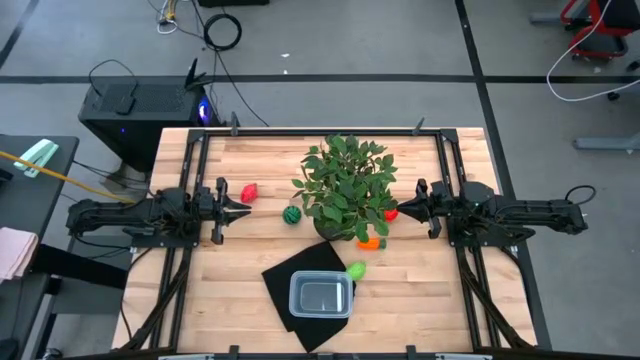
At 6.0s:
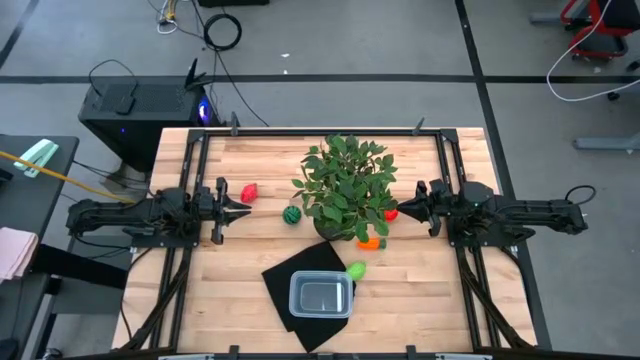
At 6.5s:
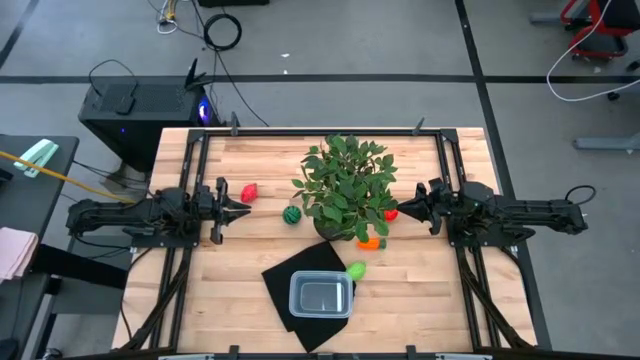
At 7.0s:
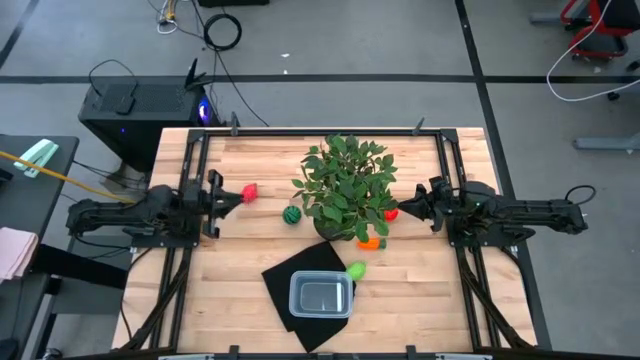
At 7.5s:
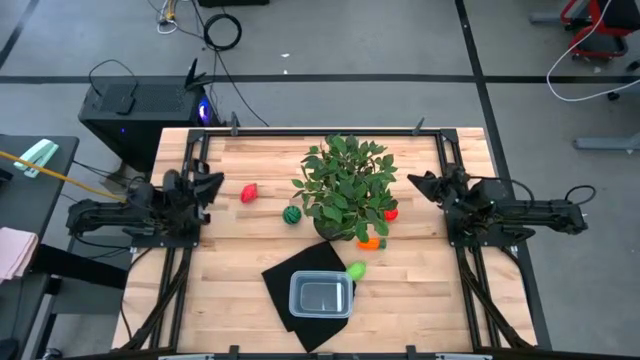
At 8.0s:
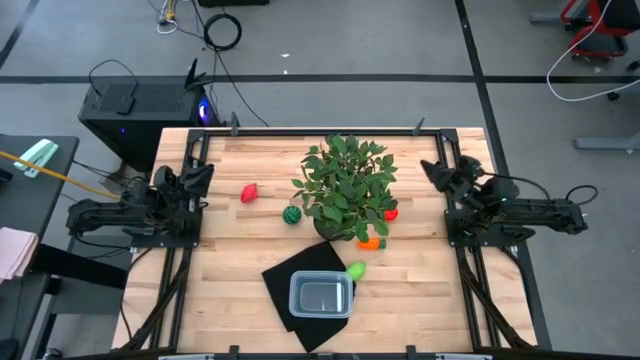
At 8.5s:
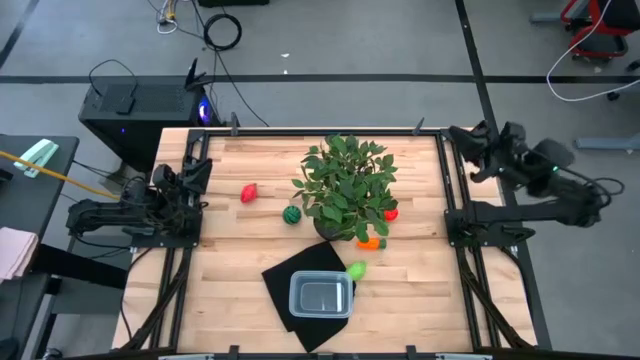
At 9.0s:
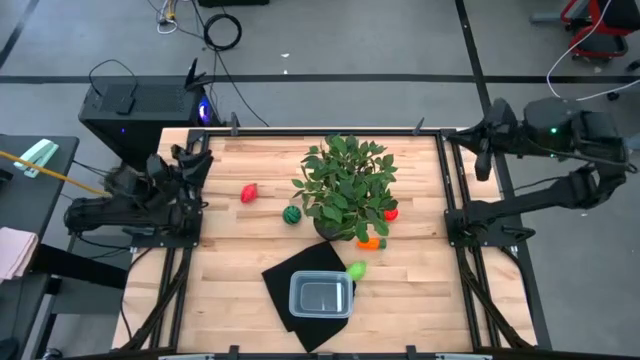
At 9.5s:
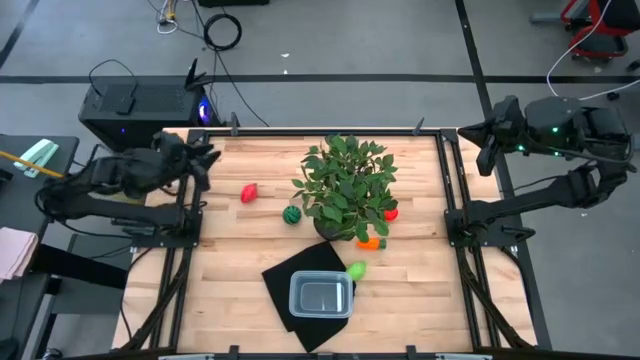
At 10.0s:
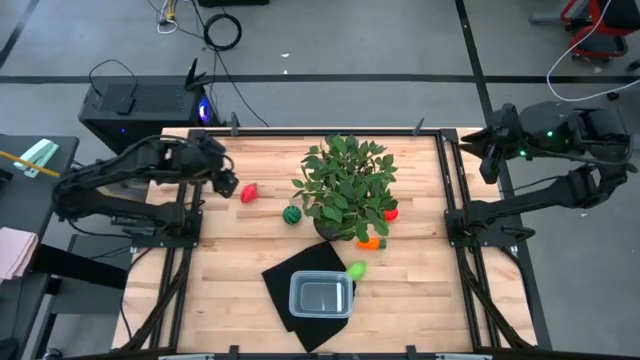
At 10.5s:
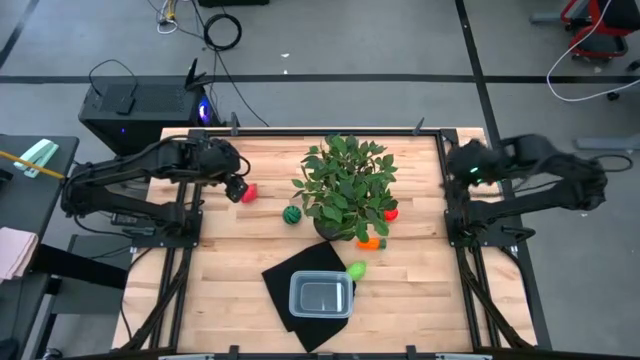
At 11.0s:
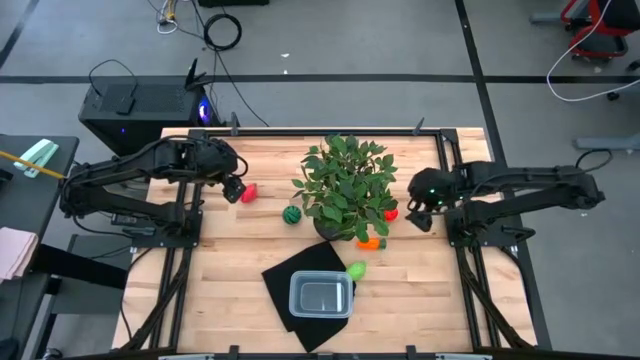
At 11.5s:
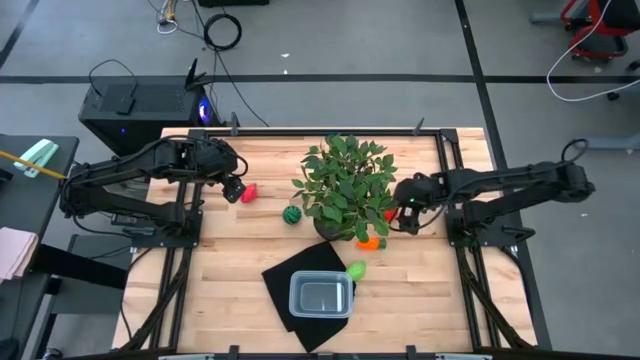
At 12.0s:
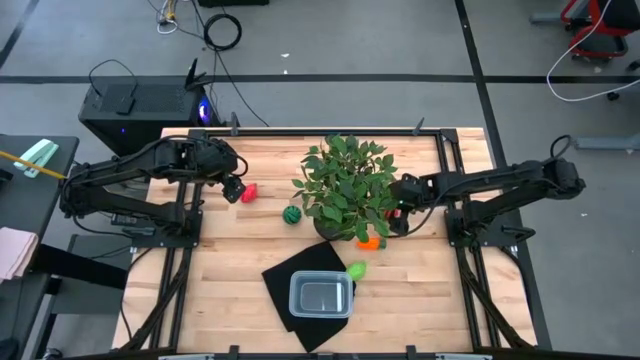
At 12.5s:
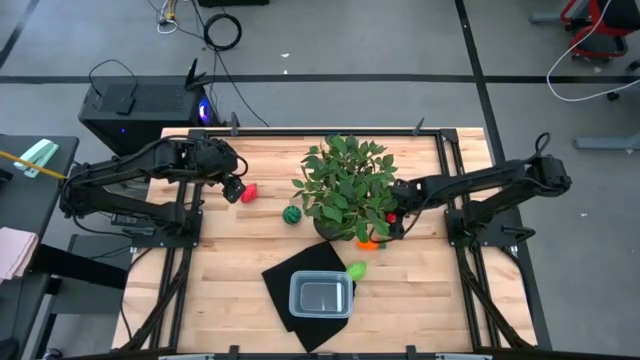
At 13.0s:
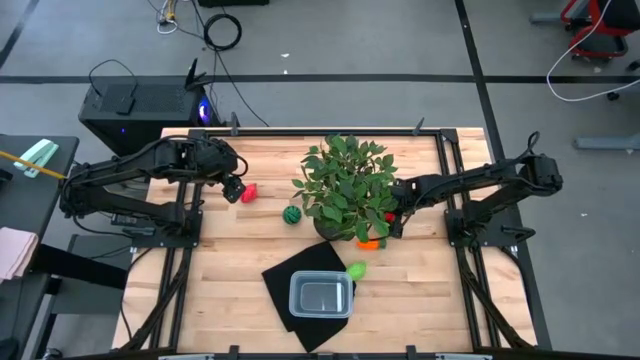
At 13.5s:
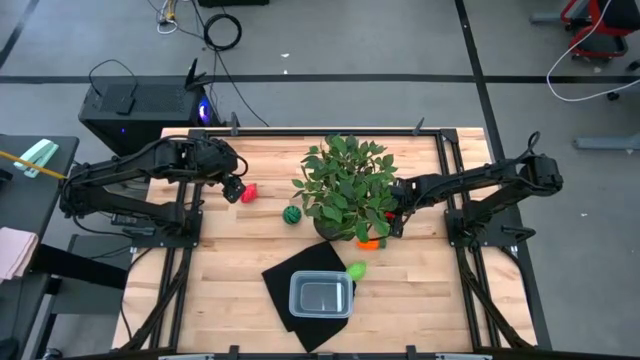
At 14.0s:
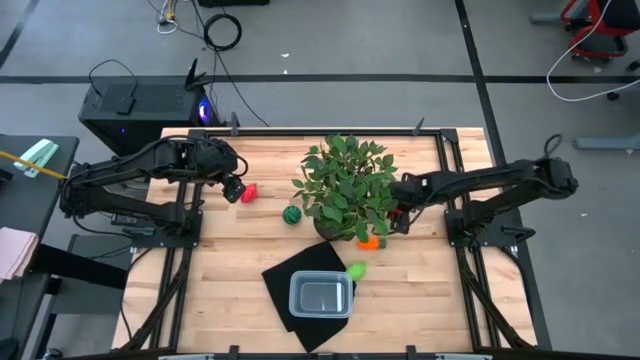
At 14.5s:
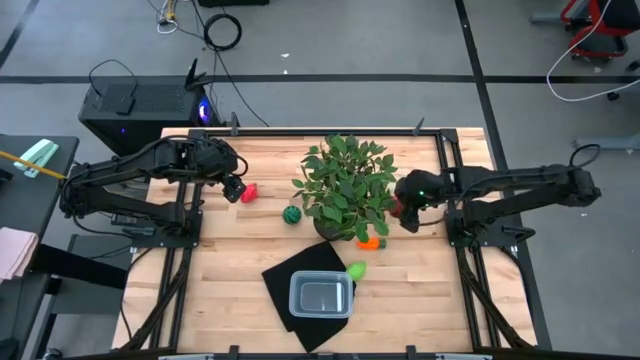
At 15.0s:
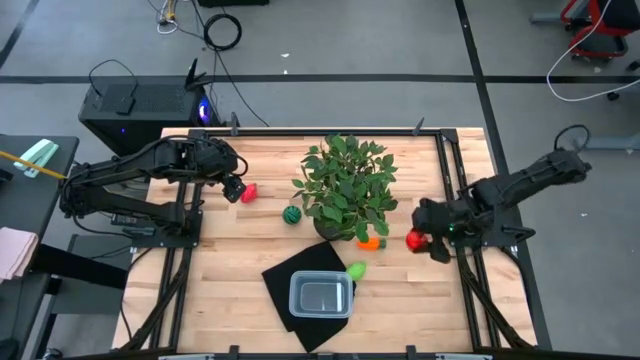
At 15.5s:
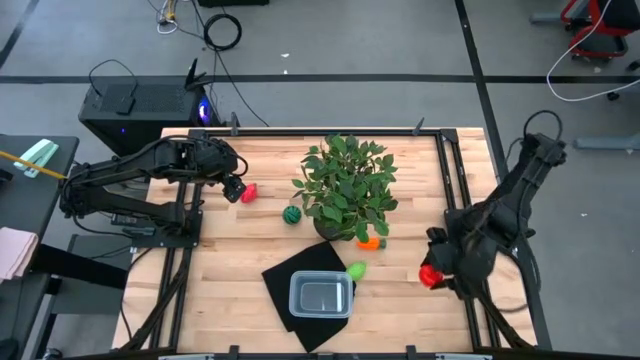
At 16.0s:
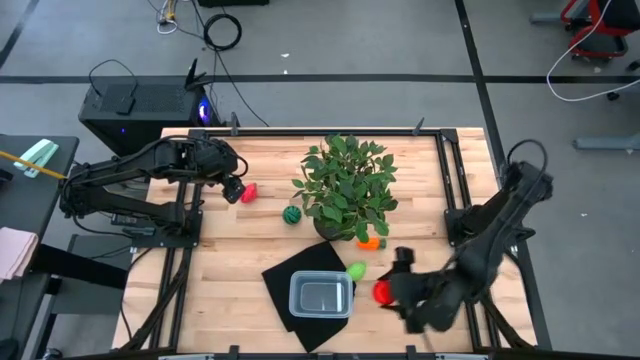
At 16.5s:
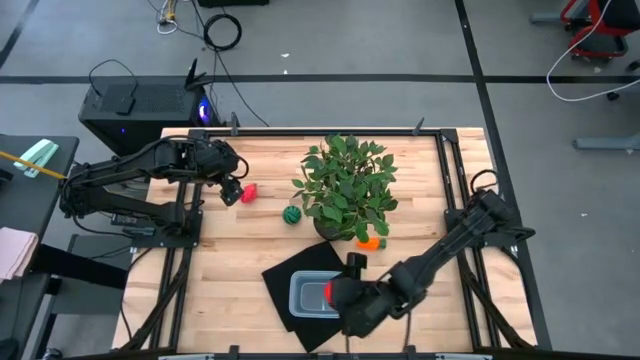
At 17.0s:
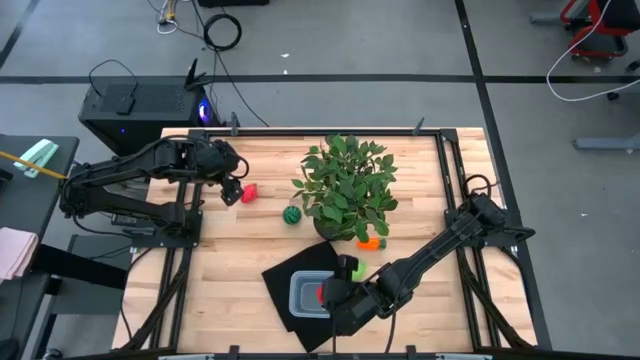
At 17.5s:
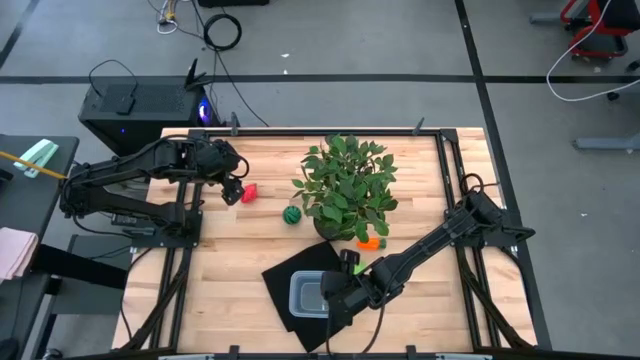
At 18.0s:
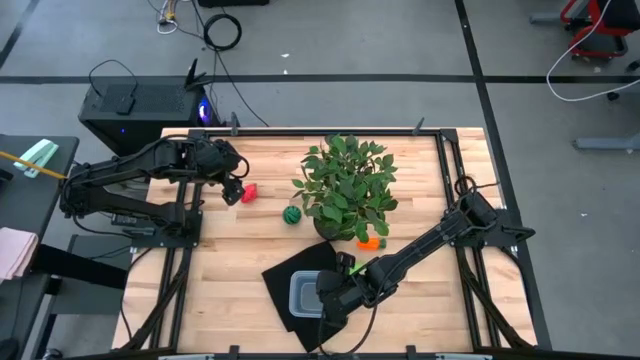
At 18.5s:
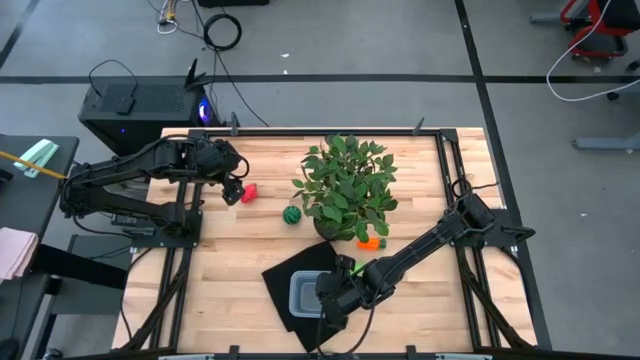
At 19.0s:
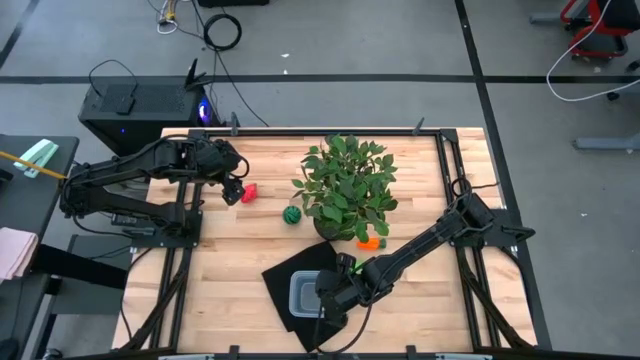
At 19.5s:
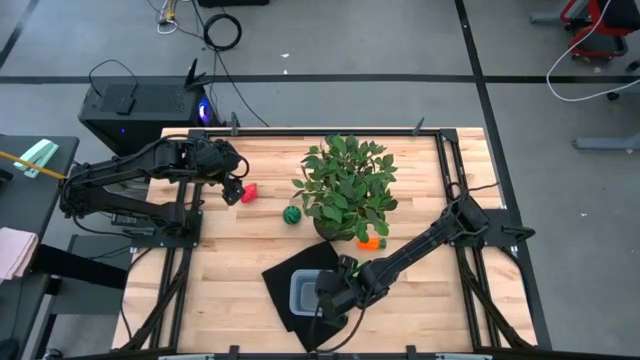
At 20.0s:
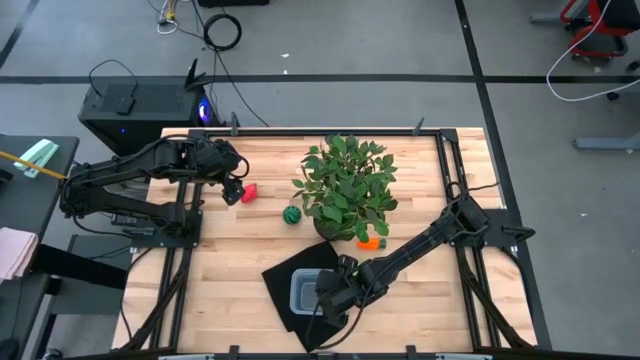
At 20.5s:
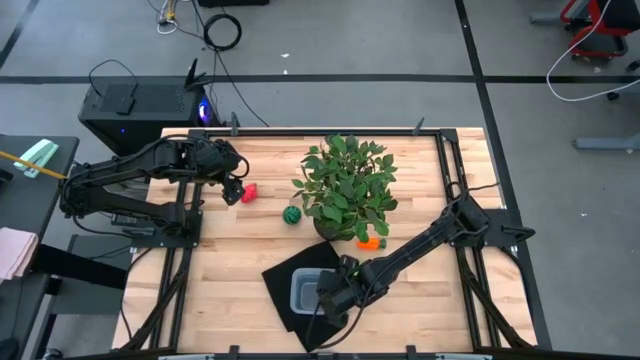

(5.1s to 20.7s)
Task: Pick and placing Produce into tupperware
Put the red apple into the transparent bin

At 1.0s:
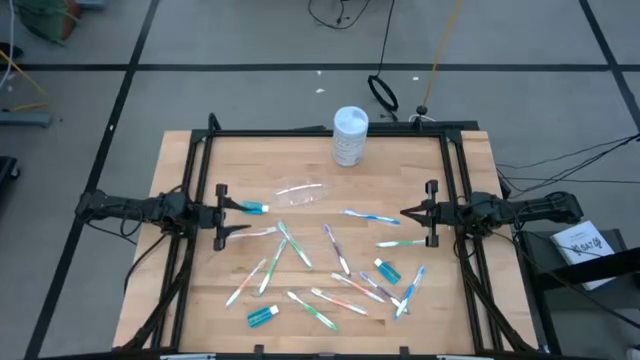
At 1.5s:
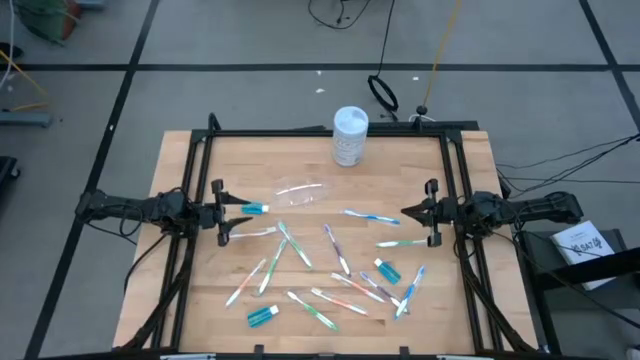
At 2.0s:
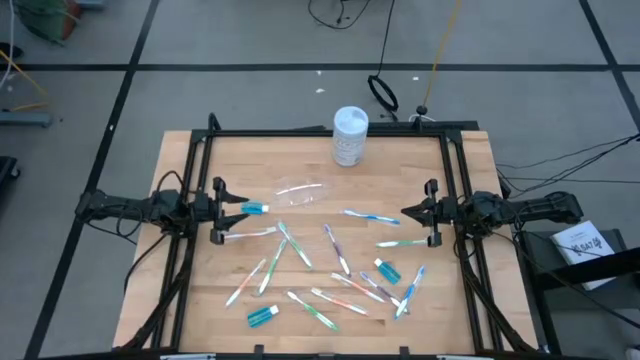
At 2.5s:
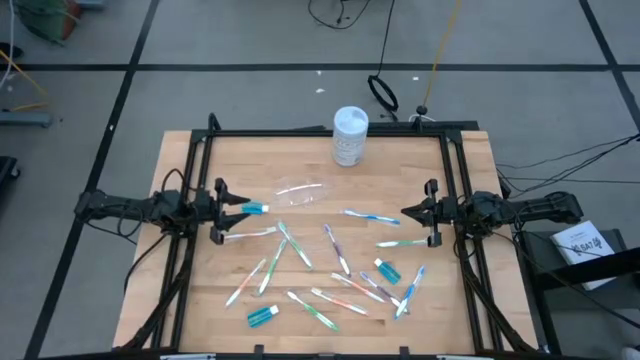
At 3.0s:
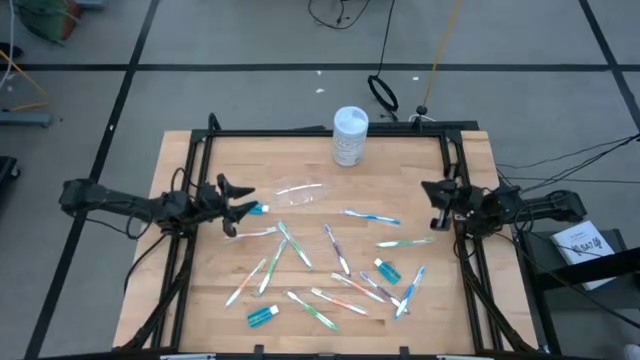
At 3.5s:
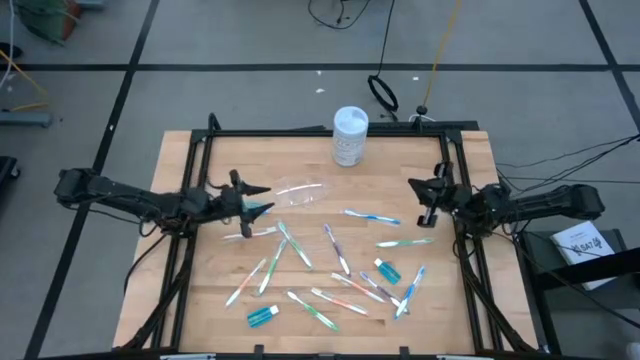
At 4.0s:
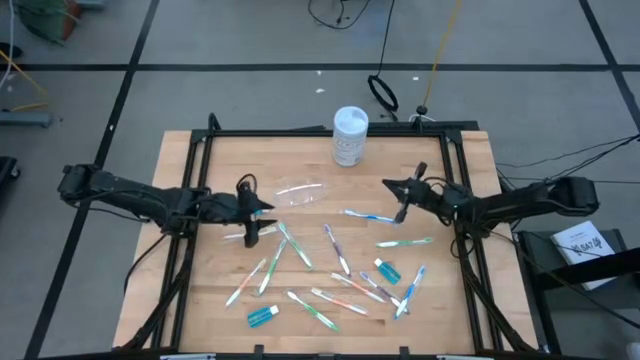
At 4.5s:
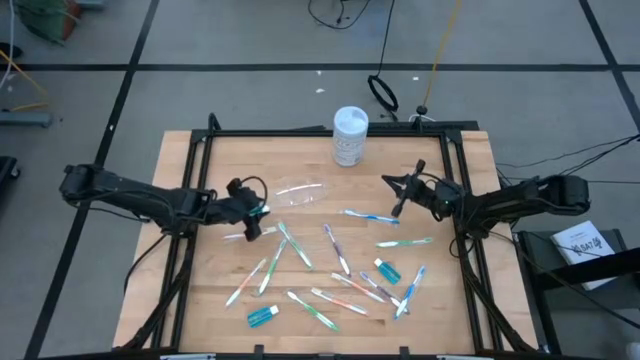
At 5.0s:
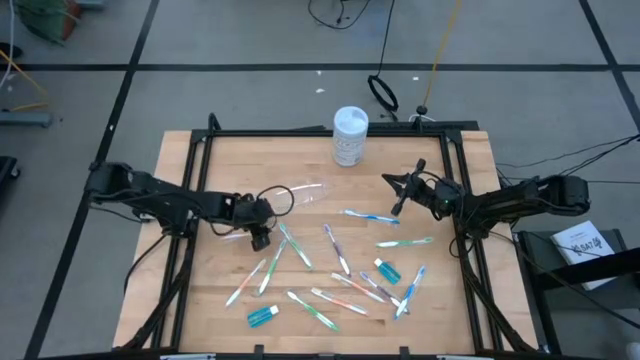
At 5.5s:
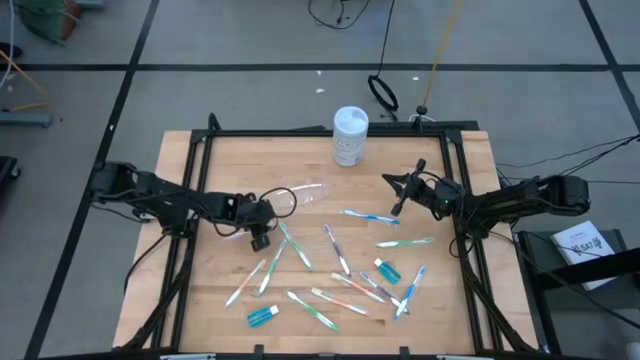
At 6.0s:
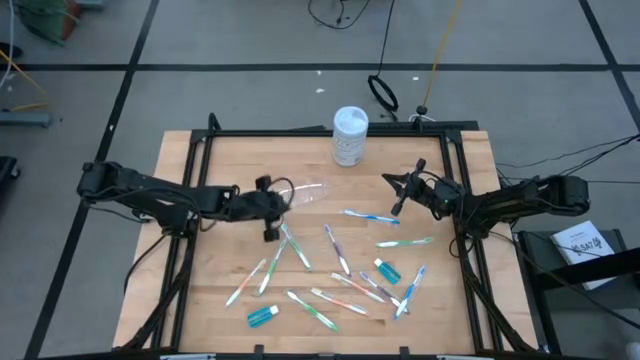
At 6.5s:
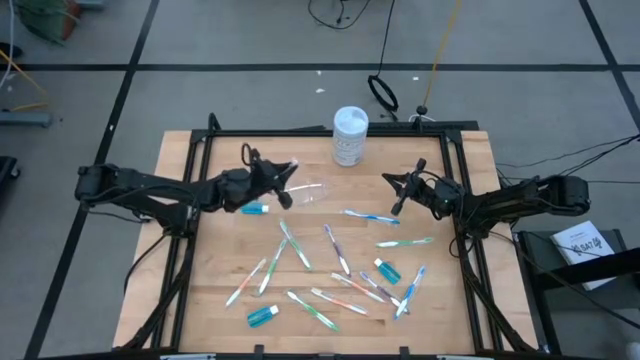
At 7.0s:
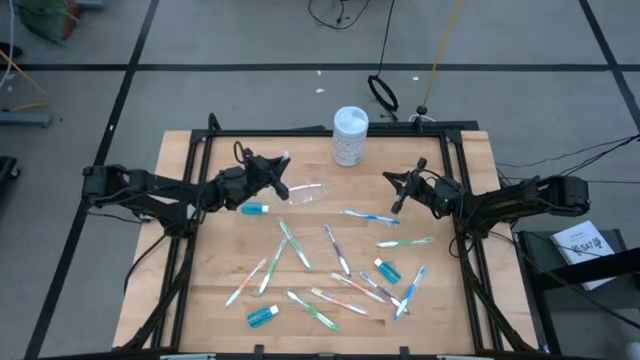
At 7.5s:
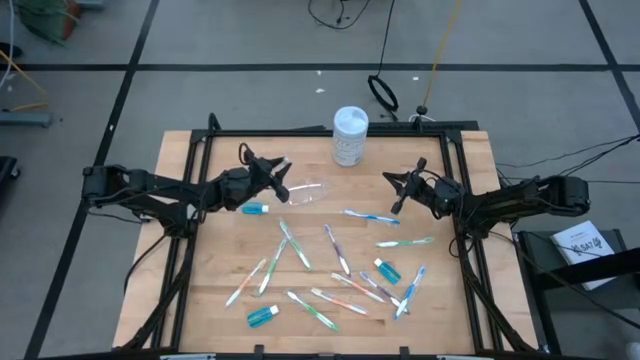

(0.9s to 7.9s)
Task: Pick & Place toothbrushing station
Put the orange toothbrush into the transparent organizer
